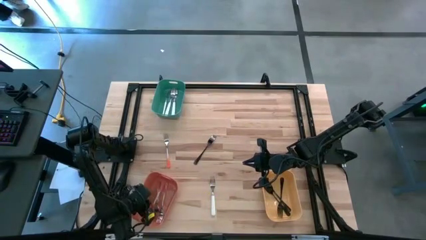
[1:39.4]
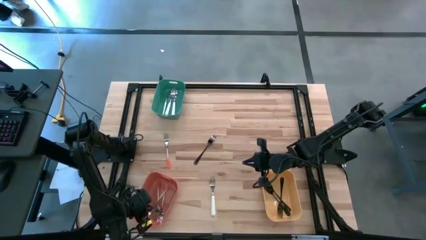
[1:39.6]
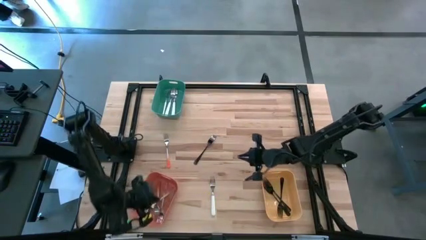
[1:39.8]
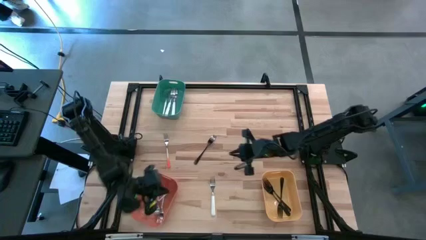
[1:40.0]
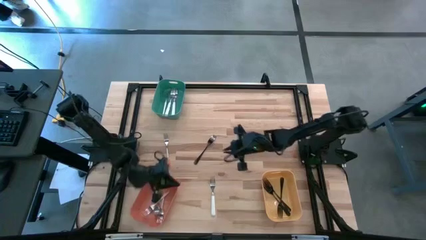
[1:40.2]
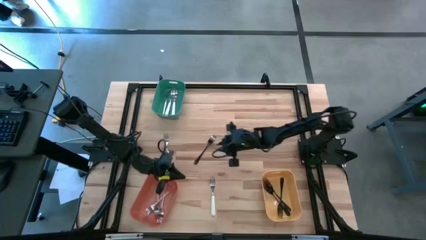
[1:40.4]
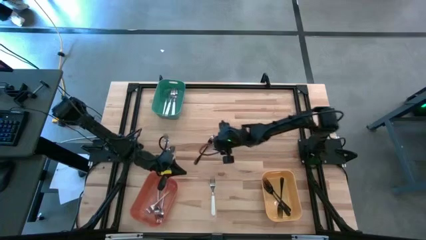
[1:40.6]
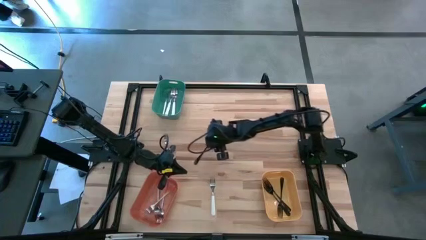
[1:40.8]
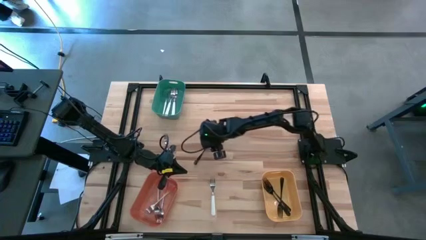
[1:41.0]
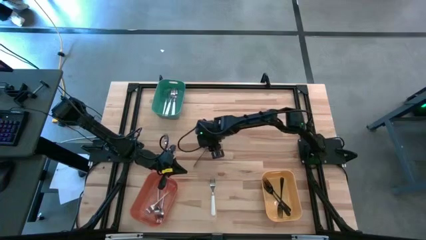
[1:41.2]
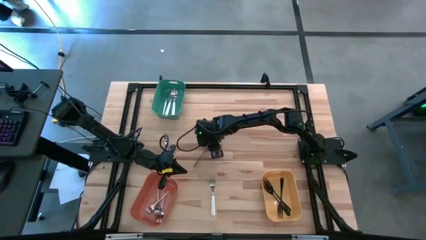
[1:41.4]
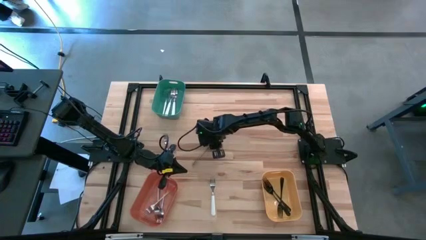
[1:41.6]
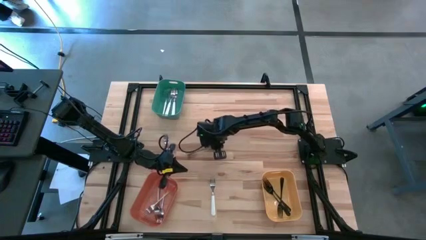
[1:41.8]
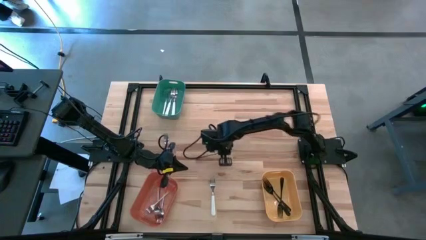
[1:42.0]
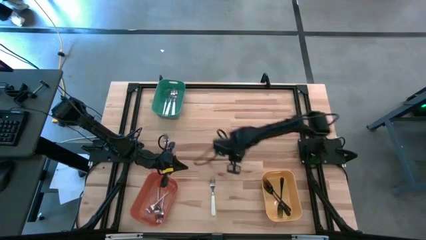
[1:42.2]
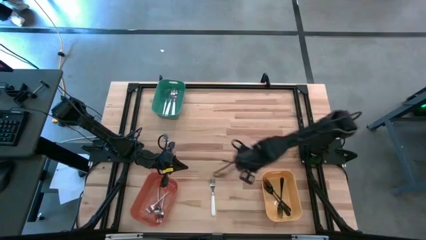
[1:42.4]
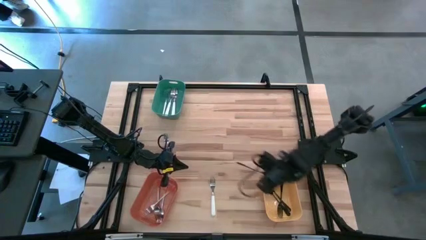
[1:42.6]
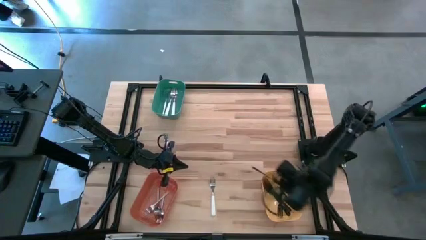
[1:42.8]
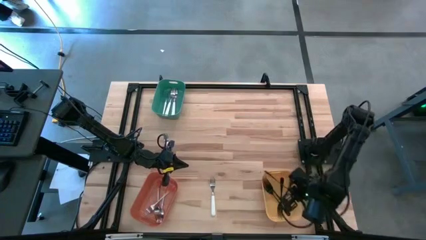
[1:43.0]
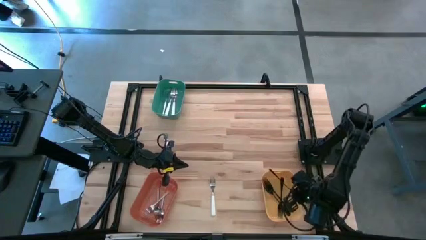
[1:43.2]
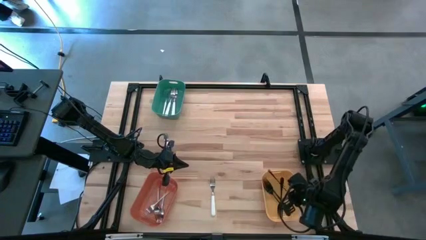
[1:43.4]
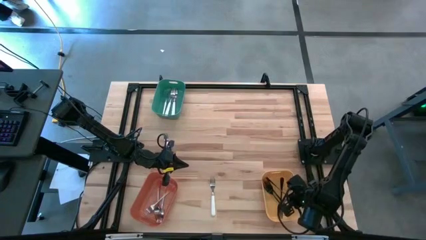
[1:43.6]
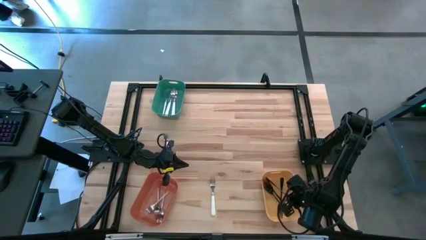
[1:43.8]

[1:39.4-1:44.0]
Task: Sort silverware by color (type)
Put the black fork into the yellow bin

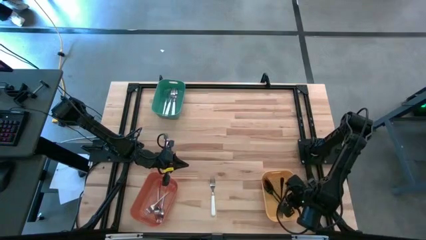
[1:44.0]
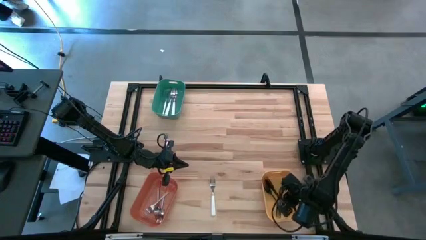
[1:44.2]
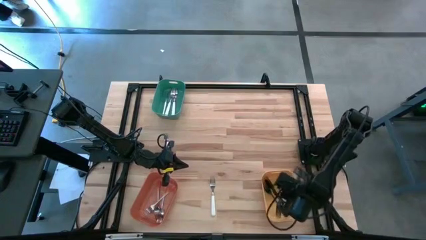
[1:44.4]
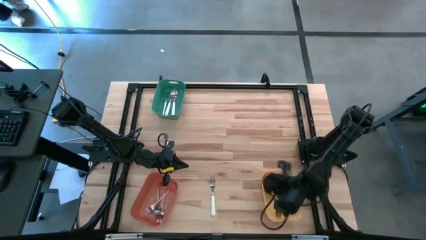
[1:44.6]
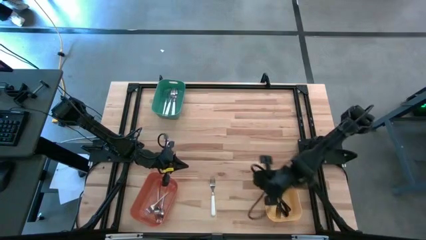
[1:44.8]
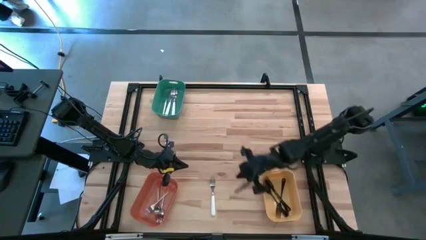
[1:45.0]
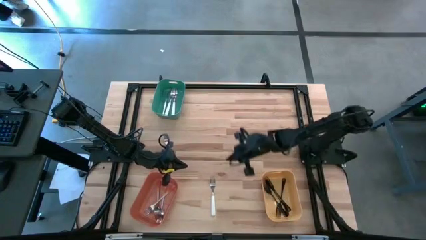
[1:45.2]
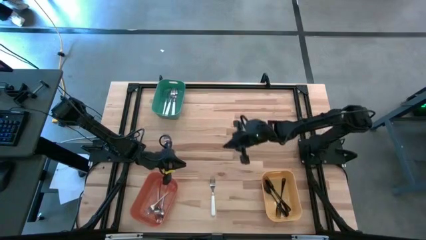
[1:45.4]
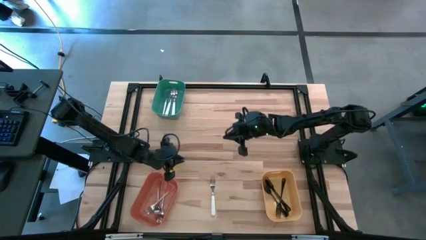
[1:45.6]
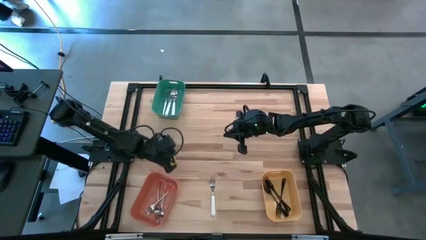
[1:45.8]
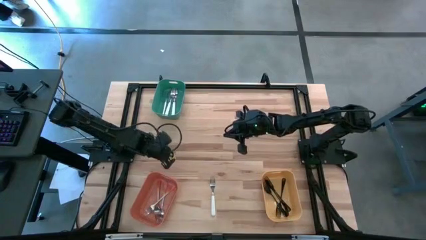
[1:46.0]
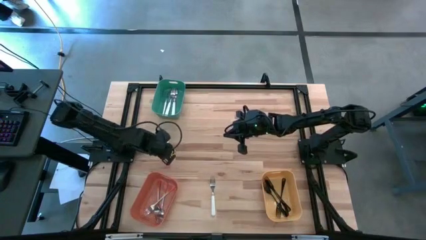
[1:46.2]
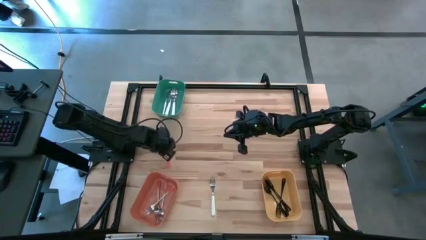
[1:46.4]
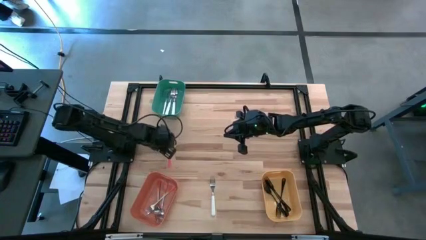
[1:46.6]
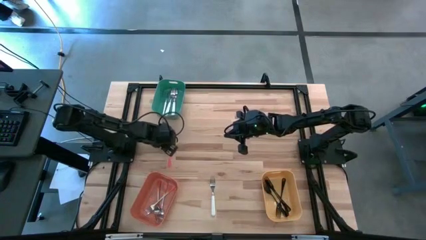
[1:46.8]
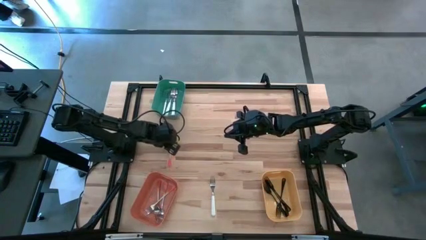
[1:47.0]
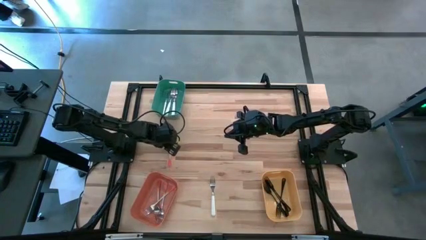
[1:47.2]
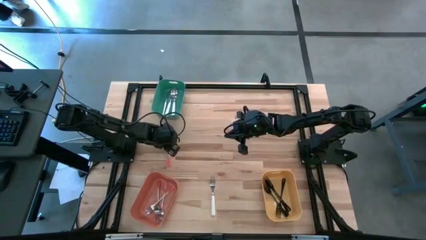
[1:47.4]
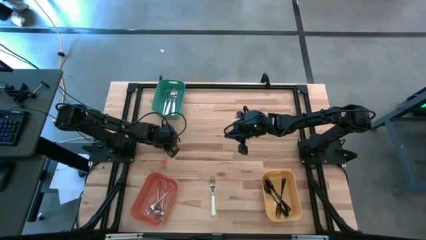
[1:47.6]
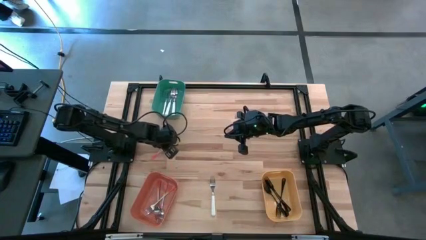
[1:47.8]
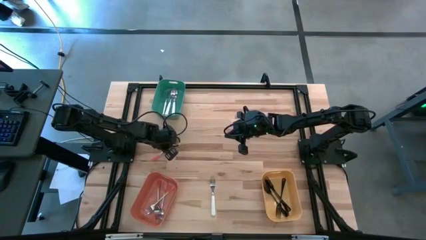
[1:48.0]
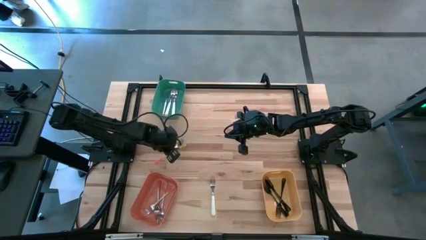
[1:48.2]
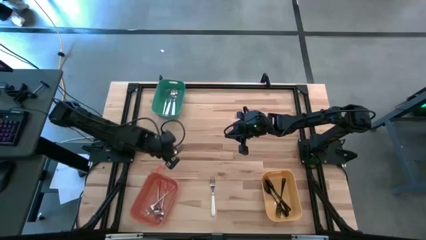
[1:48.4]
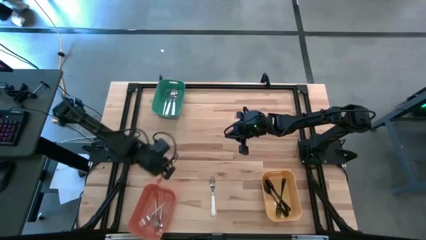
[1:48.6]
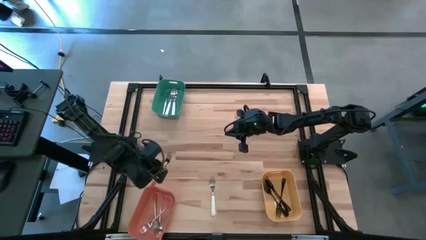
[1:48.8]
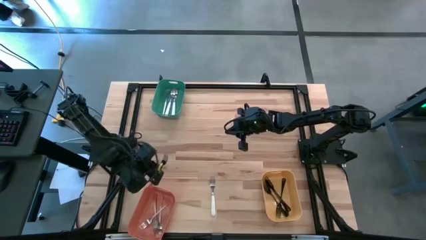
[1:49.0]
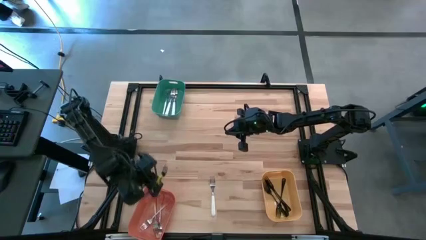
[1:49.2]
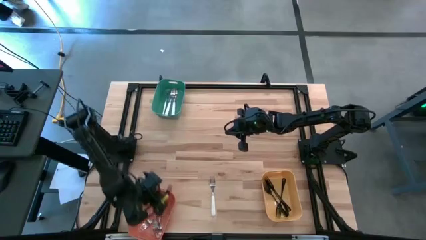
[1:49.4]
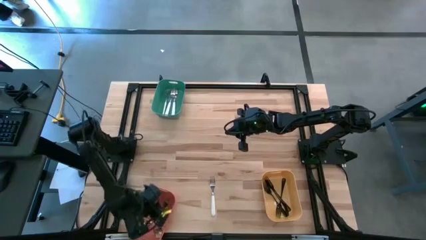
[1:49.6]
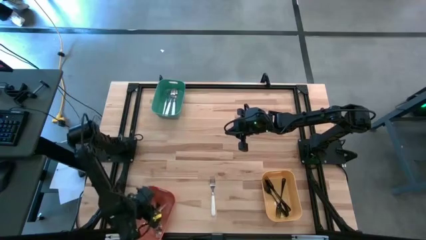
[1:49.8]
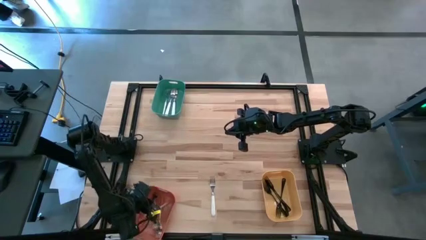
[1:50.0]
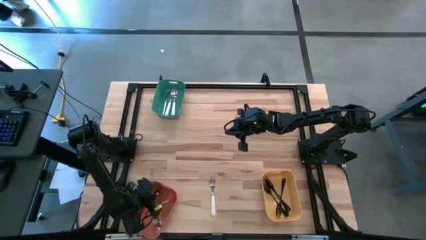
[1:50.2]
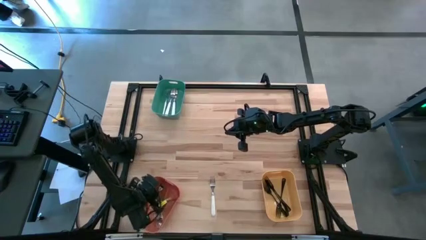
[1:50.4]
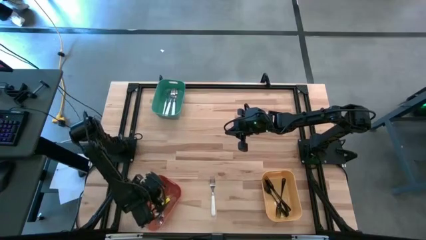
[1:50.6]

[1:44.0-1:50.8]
Put the orange fork into the orange bin

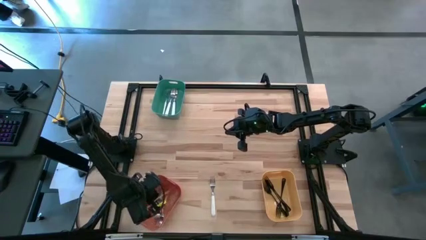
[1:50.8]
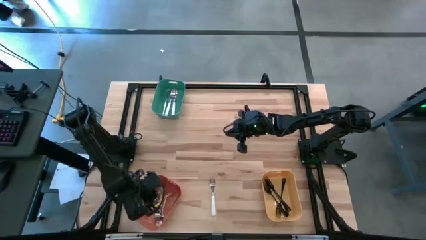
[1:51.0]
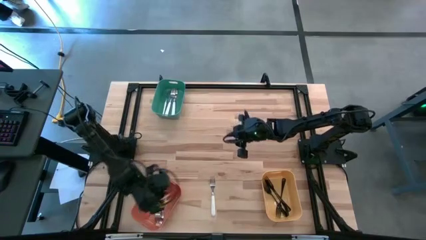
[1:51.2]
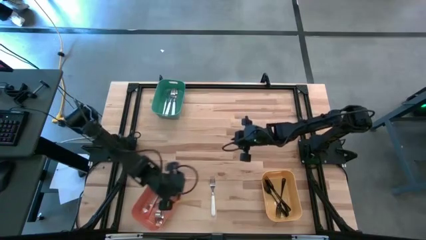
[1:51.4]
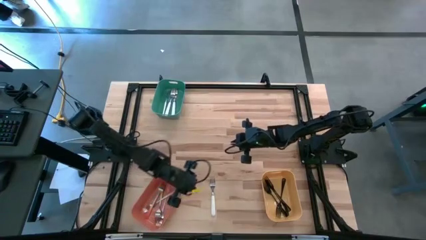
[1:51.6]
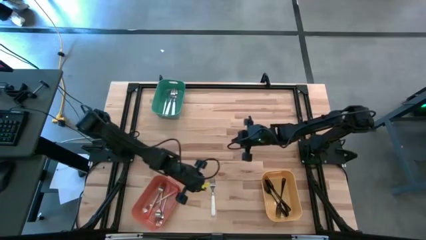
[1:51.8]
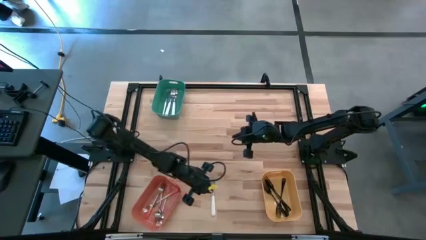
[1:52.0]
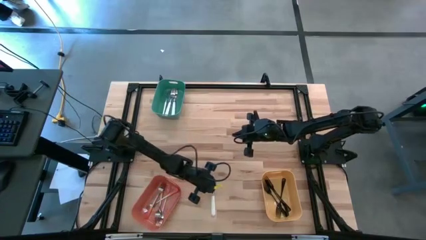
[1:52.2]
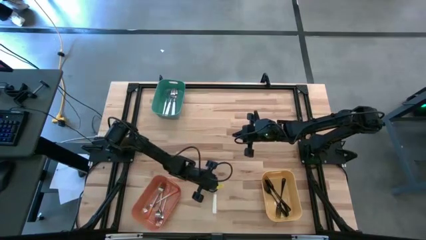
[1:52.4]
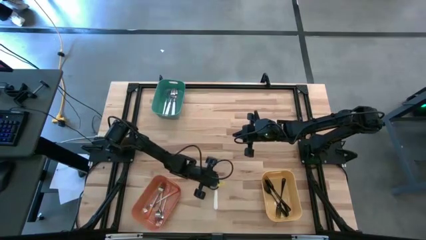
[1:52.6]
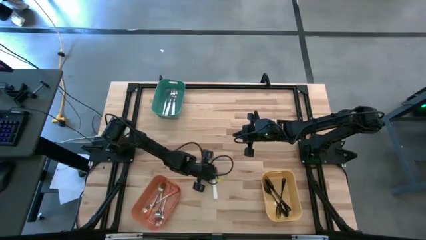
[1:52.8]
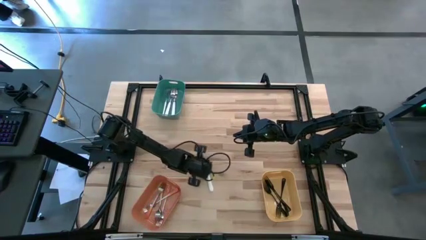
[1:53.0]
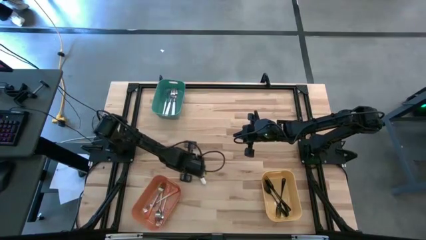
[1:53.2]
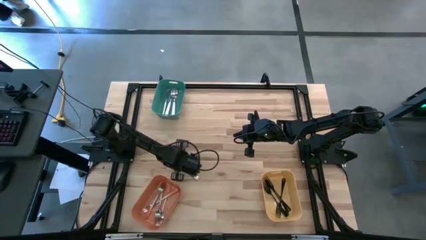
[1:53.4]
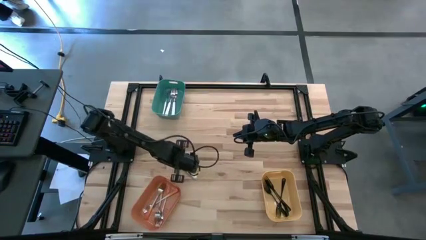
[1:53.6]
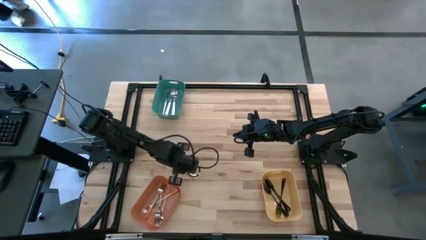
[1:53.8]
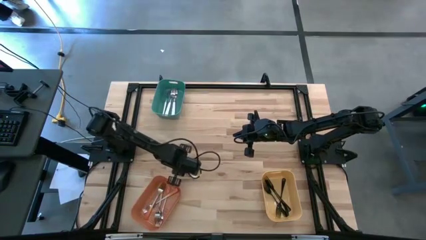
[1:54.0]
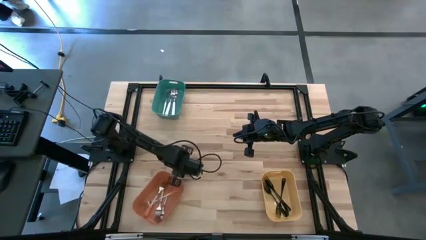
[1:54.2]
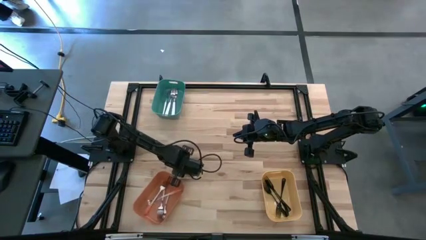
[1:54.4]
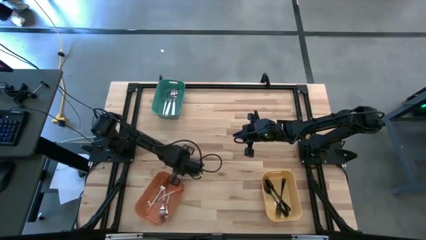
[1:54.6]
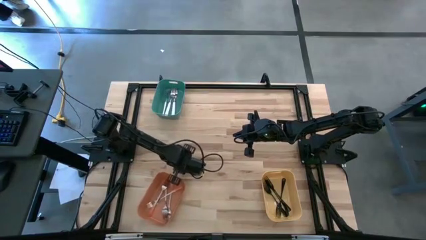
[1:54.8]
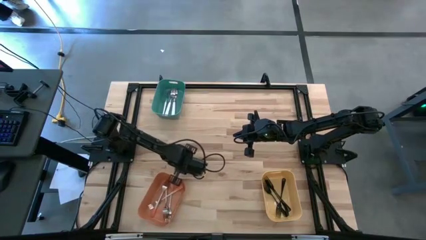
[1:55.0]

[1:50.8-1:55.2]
Put the white fork into the green bin

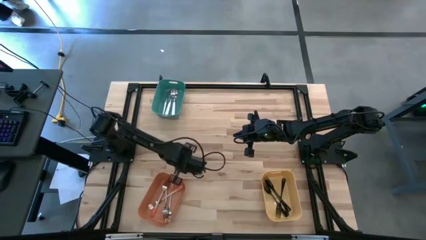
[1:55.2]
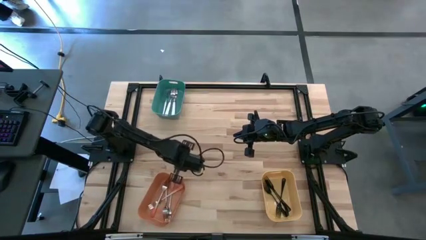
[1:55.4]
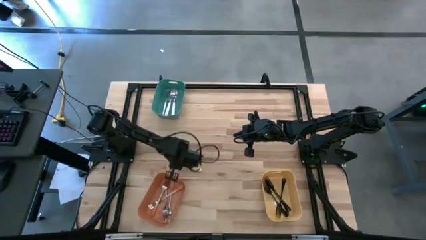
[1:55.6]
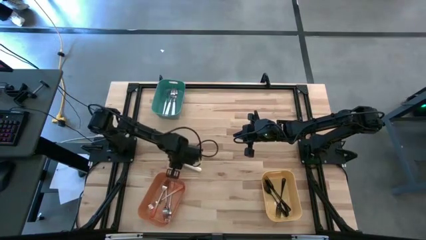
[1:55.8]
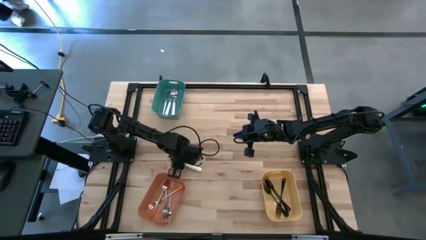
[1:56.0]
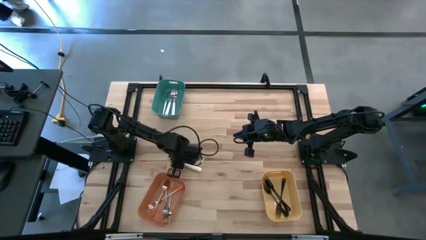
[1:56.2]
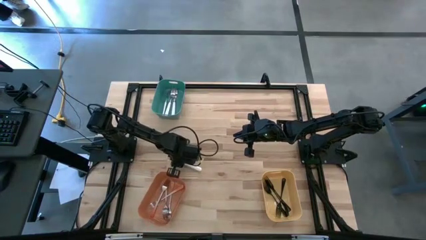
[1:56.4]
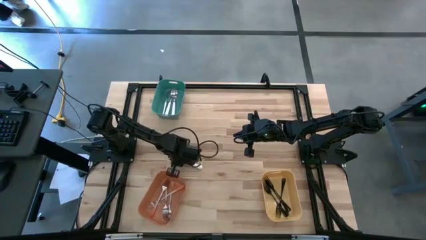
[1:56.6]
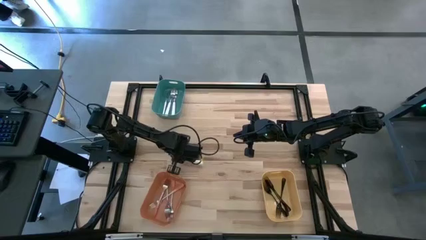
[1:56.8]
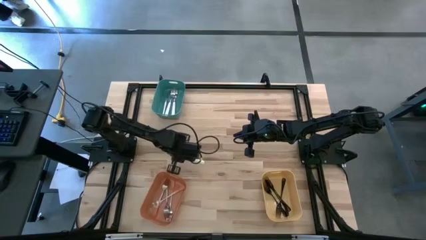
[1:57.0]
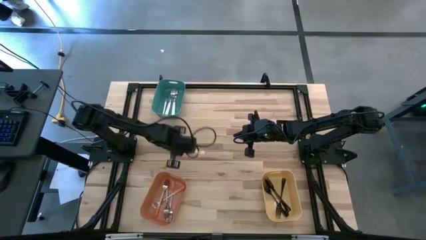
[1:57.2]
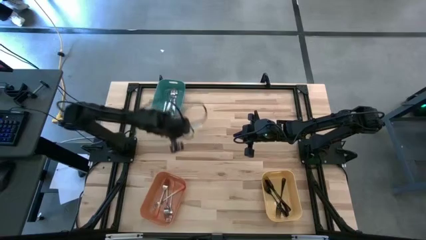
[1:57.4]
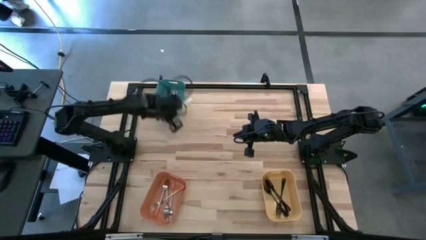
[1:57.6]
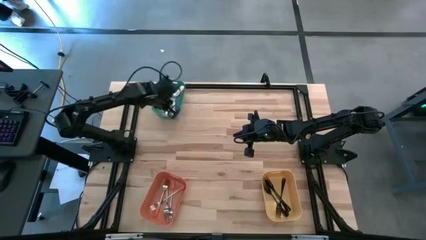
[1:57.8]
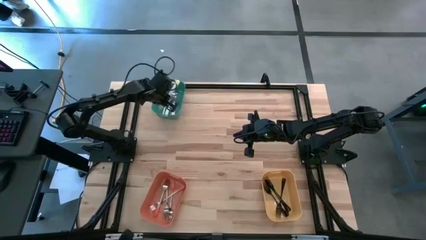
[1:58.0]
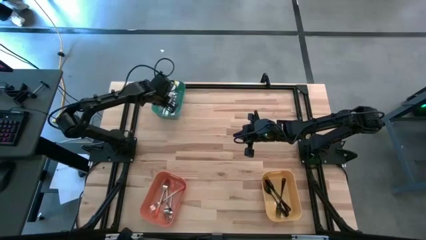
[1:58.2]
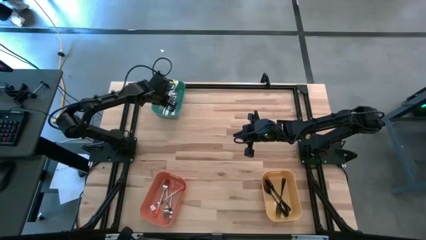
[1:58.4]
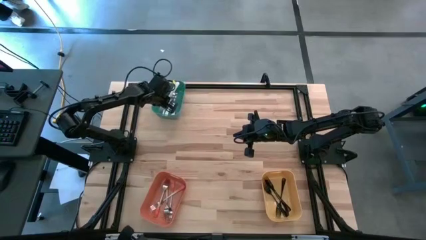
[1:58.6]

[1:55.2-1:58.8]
Put the white fork into the green bin
